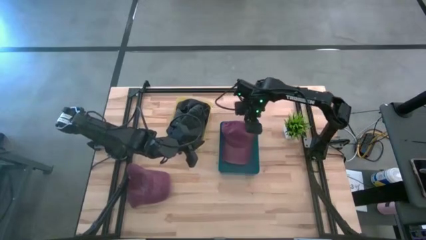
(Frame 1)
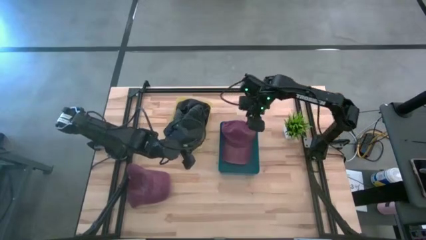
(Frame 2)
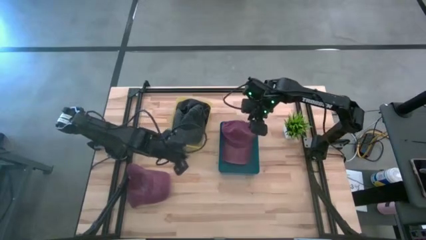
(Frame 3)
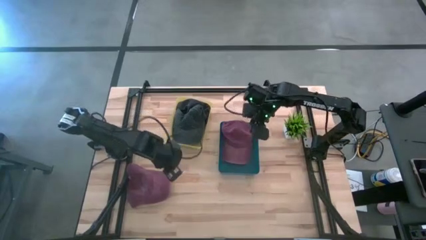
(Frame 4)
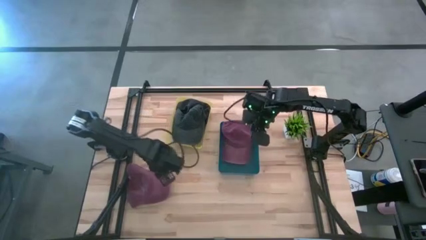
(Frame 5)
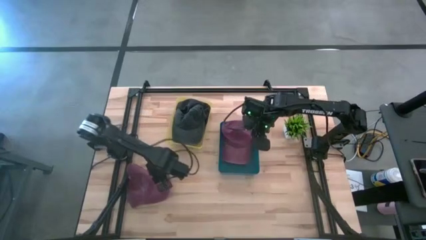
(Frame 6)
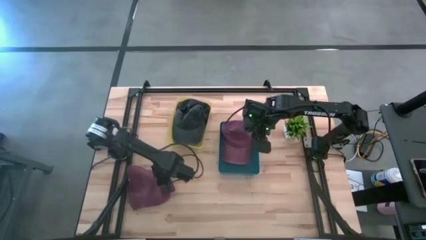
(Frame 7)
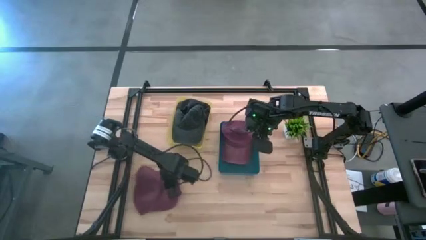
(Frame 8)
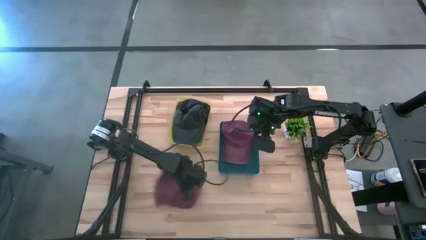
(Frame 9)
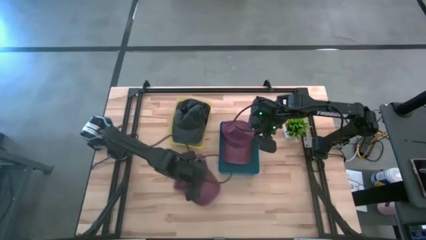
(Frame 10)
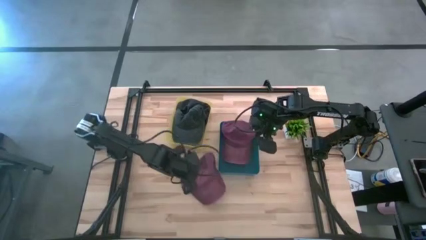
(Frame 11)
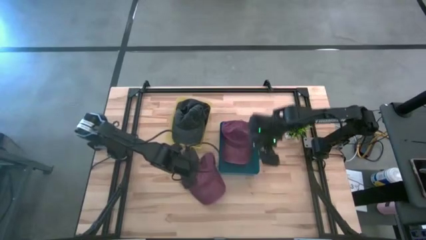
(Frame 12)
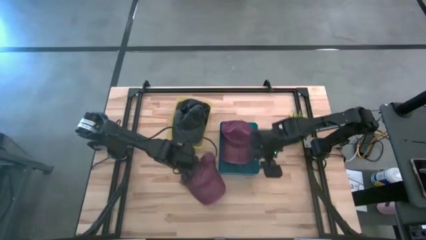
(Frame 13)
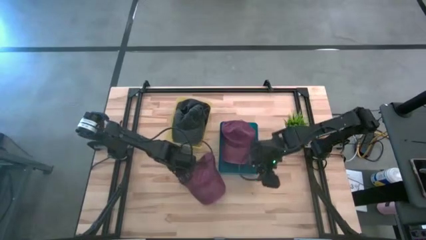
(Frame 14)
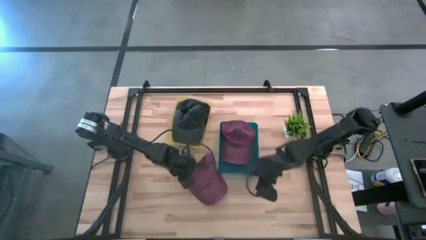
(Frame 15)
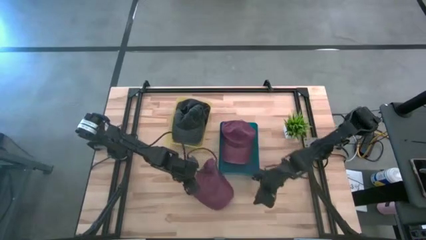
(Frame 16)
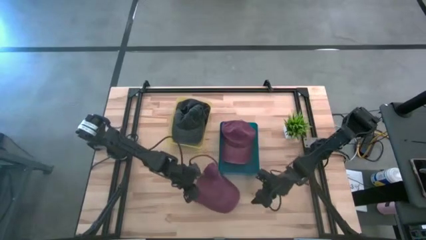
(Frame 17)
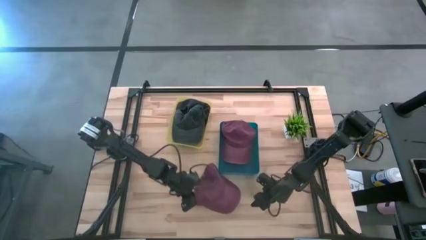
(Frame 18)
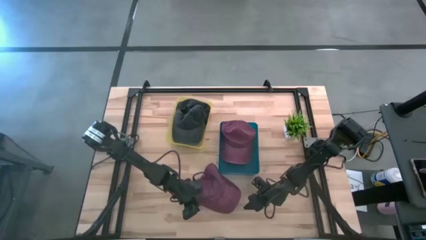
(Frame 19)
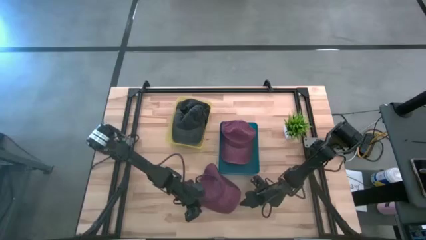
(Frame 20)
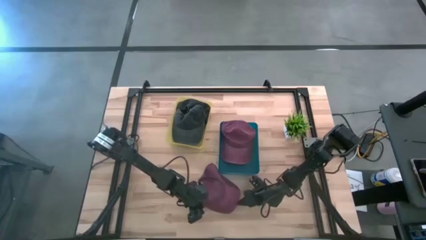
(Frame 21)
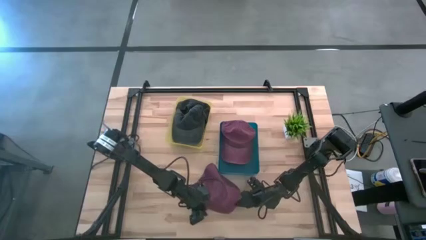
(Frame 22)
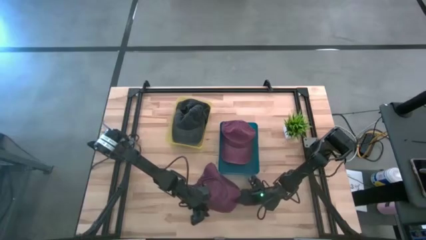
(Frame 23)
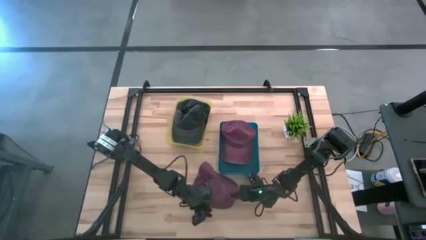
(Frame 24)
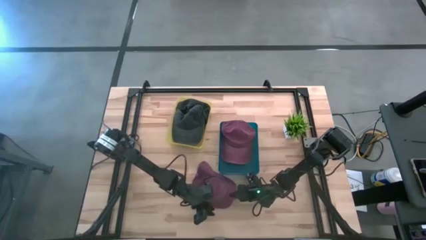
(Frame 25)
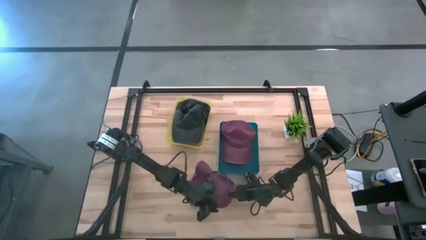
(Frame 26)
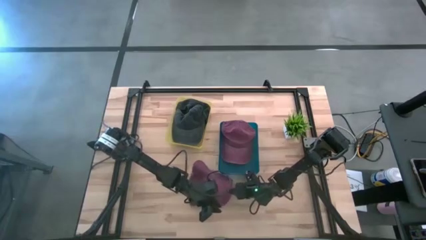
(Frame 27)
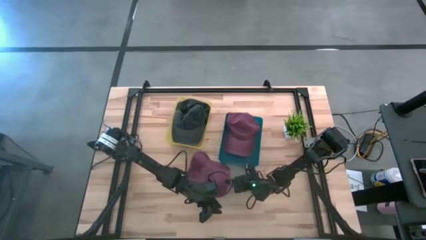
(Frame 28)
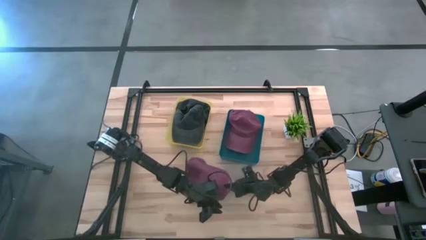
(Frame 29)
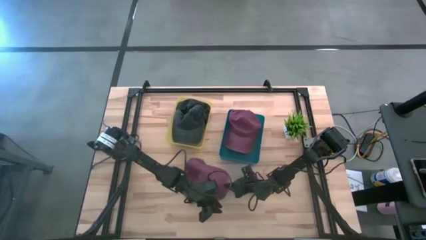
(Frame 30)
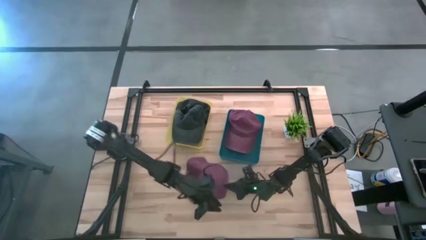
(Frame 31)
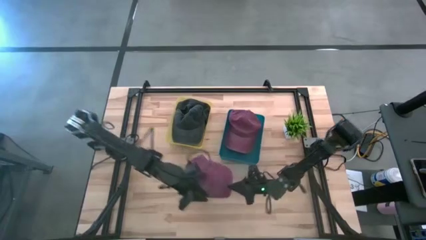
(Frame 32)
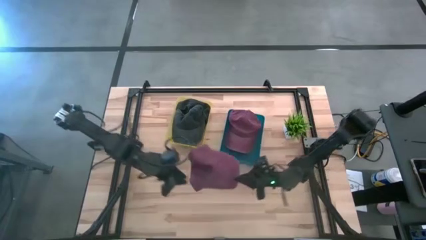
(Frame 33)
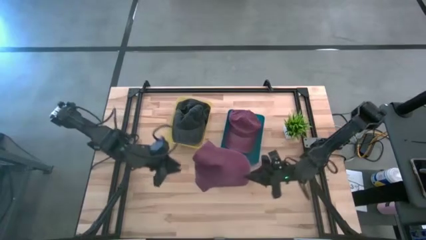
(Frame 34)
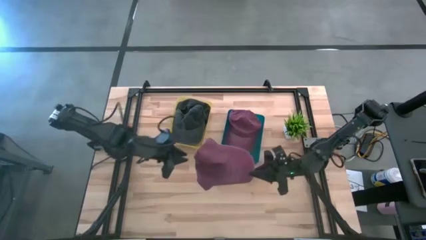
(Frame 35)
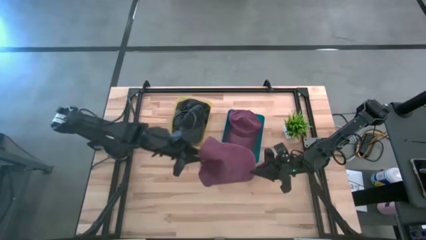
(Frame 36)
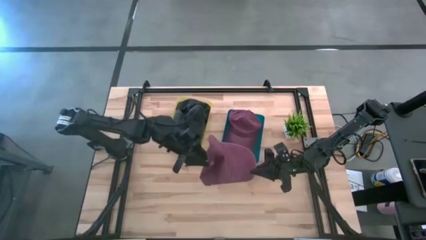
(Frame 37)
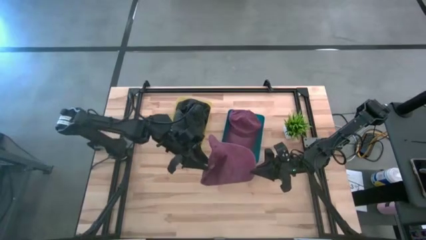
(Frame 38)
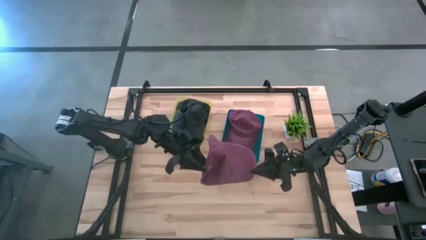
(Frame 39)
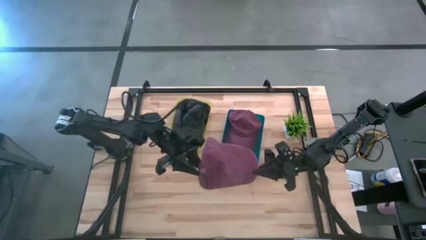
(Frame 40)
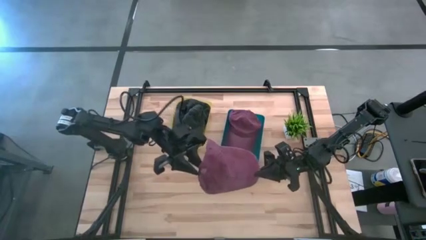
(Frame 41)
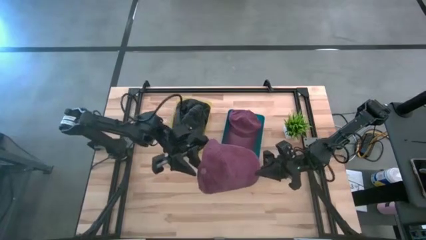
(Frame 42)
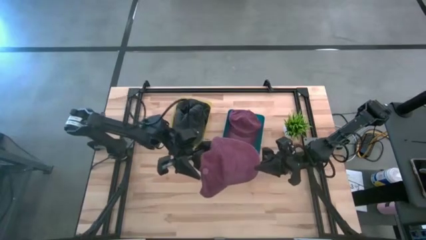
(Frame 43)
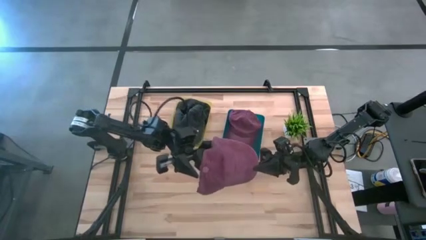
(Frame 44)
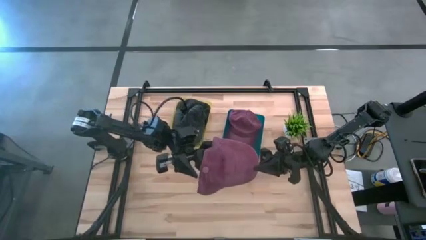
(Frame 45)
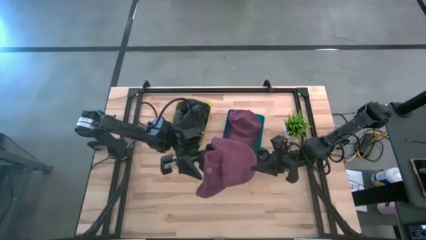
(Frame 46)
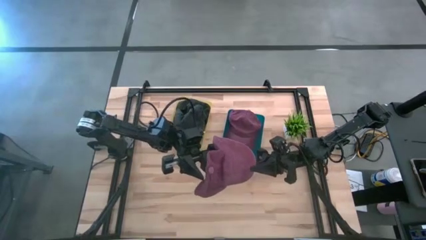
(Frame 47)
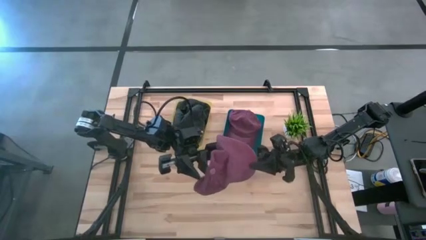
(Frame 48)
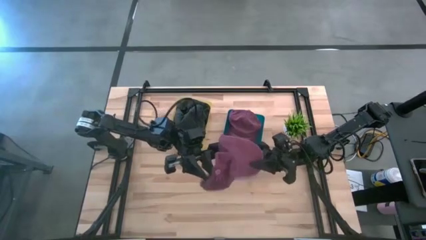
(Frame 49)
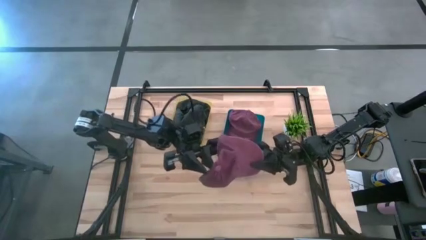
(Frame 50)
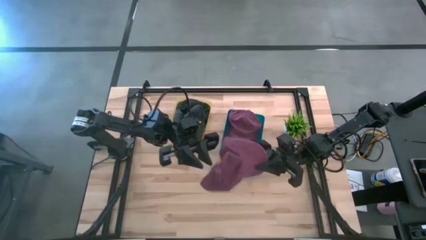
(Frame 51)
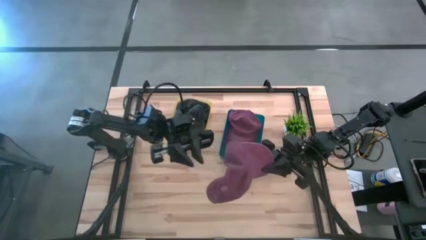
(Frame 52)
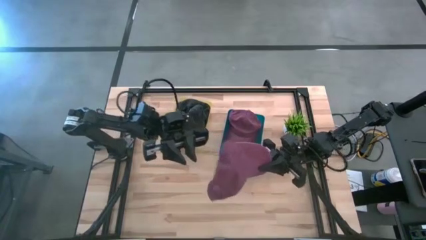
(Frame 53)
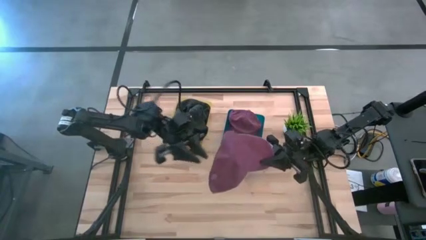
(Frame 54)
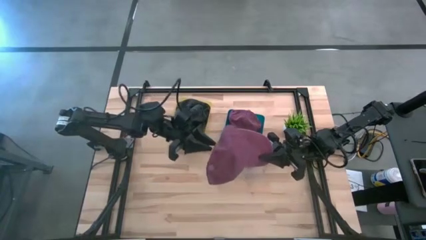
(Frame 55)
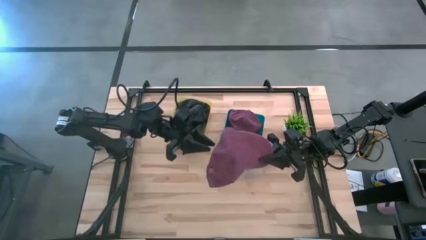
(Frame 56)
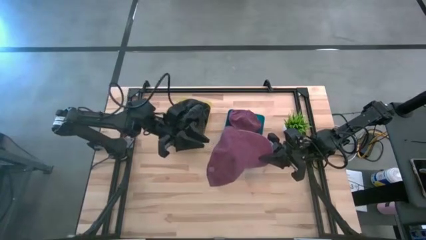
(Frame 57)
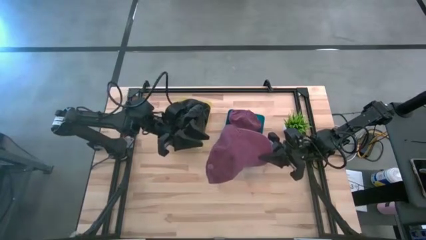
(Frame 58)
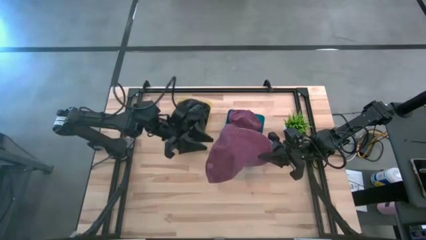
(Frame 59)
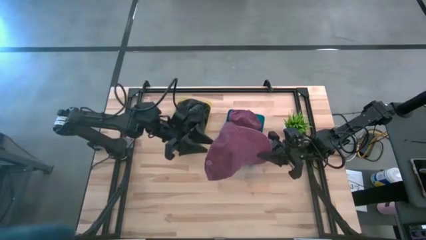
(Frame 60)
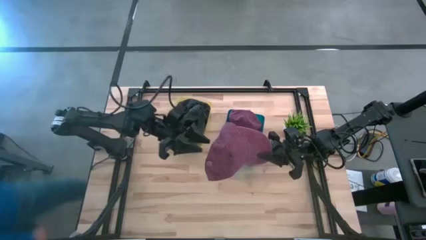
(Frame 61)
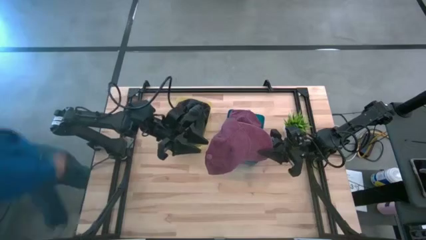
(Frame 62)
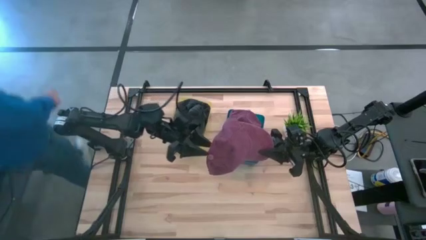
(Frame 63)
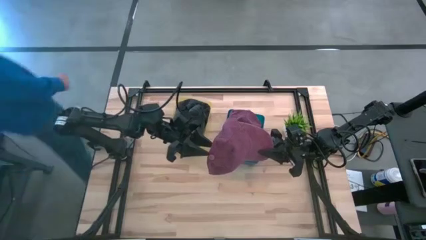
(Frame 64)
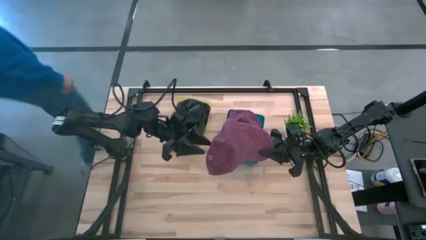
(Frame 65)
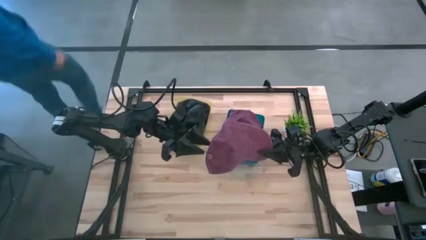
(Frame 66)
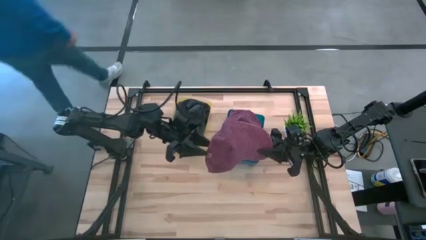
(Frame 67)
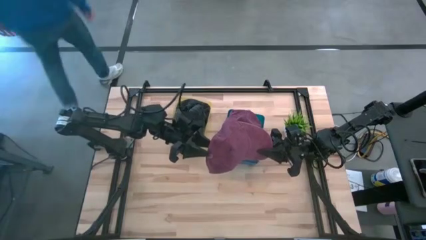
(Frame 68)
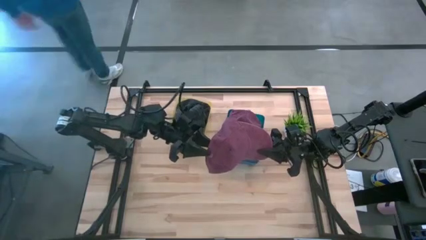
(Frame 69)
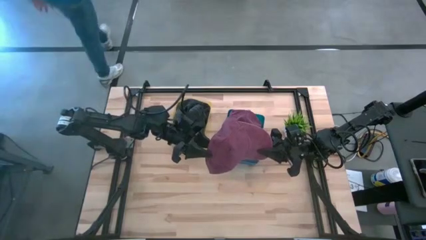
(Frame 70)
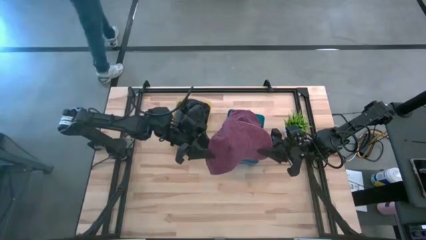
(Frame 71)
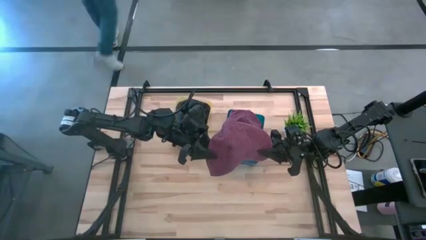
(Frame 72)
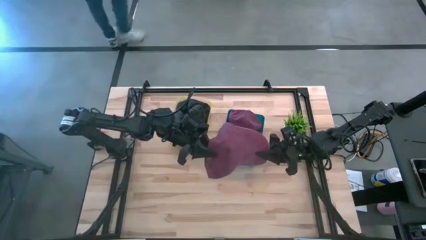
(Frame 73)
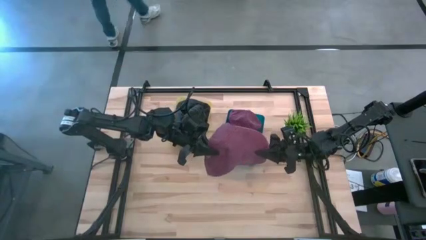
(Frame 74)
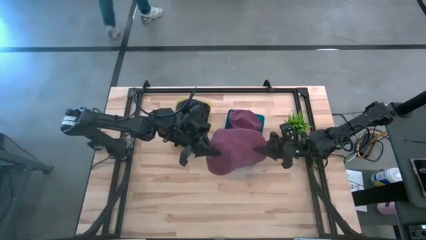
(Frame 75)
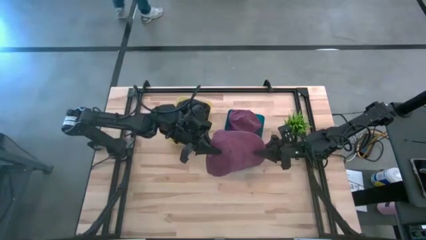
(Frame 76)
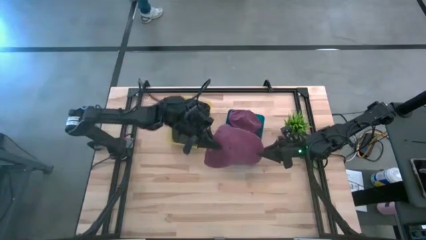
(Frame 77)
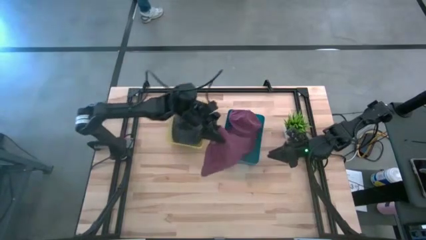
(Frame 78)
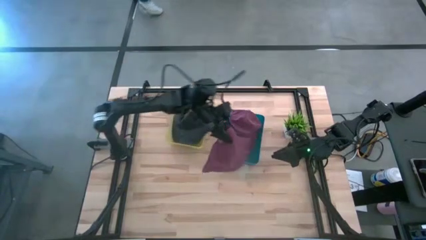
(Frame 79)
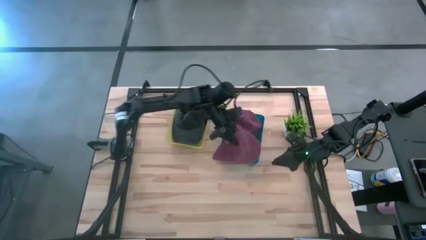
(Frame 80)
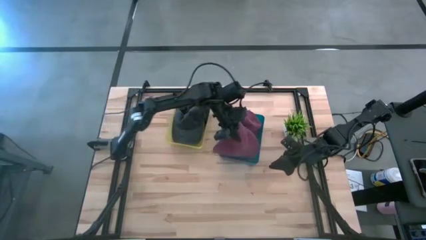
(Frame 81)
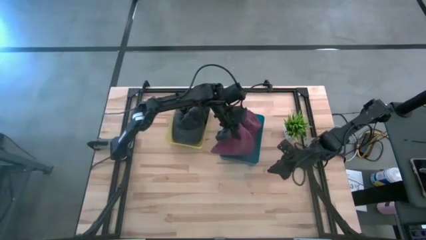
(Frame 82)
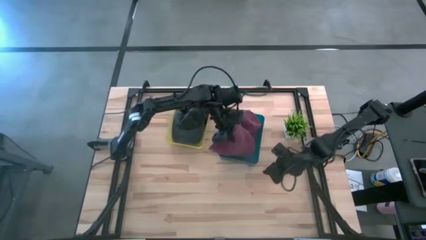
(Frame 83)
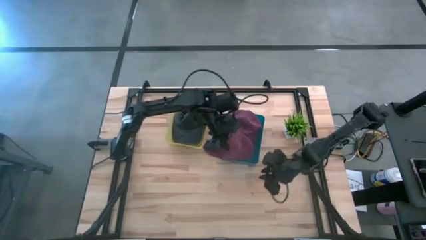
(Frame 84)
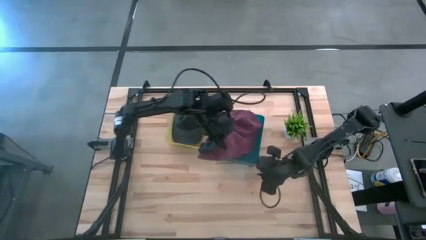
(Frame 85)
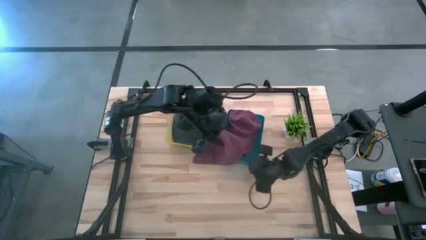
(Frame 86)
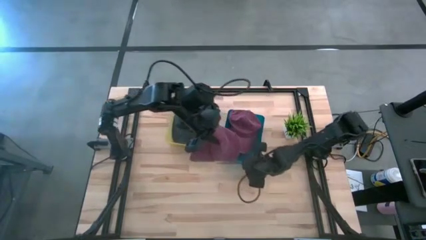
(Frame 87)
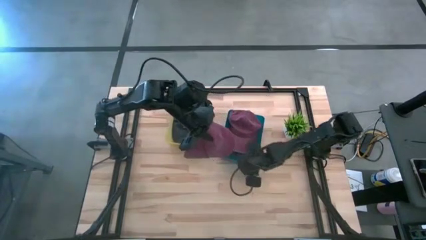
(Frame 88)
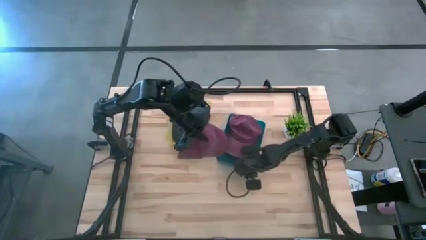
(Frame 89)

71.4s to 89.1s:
Task: Pick & Place hat
Put the red cap into the blue bin
